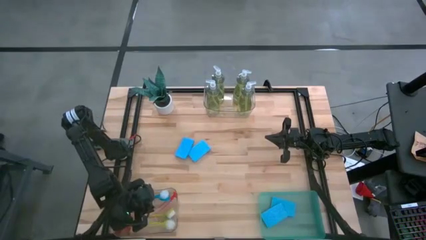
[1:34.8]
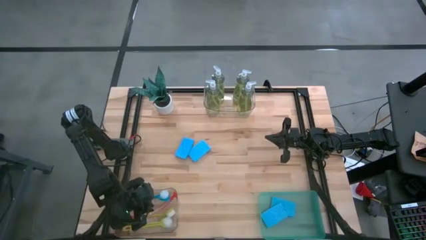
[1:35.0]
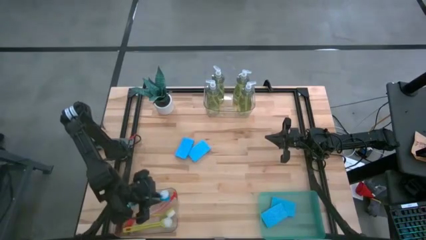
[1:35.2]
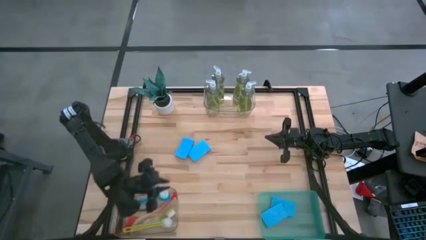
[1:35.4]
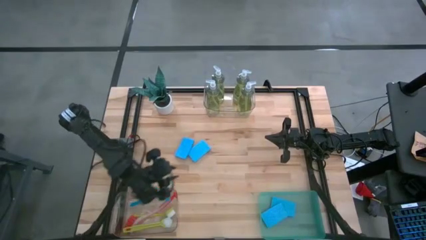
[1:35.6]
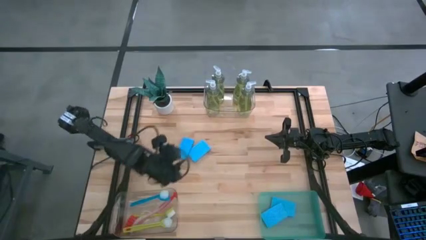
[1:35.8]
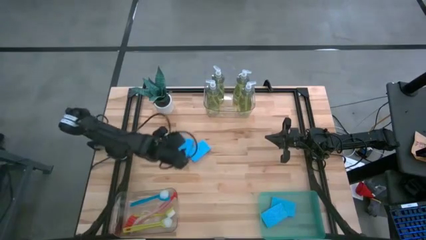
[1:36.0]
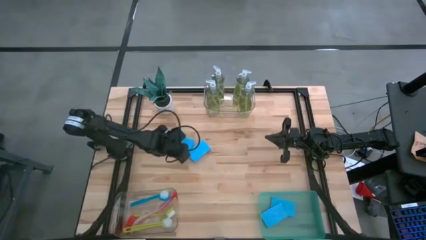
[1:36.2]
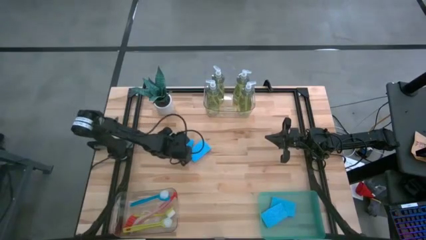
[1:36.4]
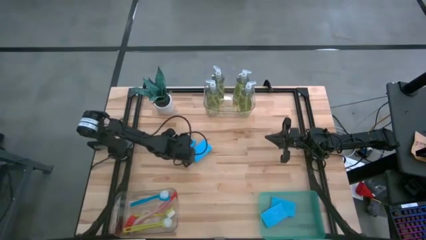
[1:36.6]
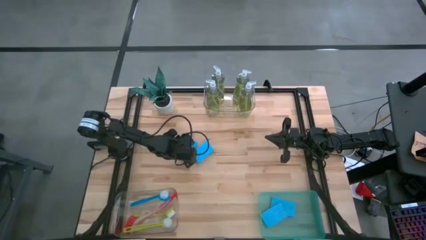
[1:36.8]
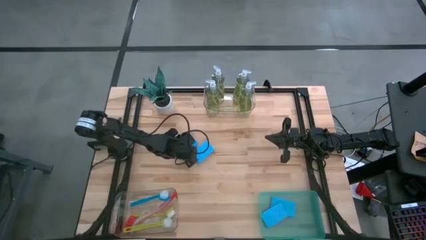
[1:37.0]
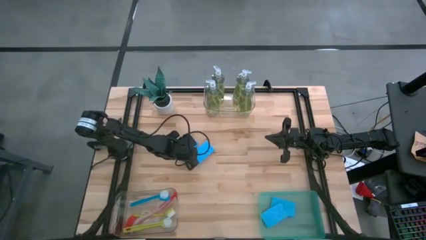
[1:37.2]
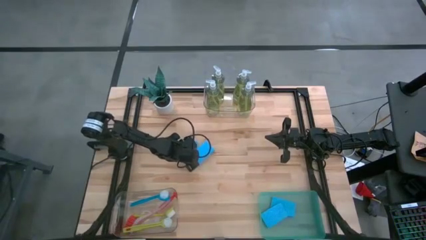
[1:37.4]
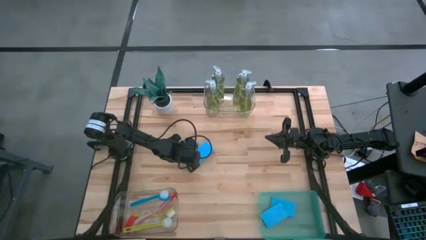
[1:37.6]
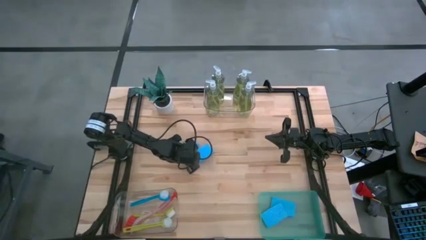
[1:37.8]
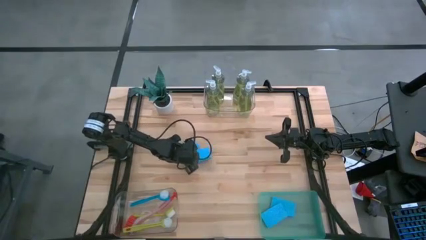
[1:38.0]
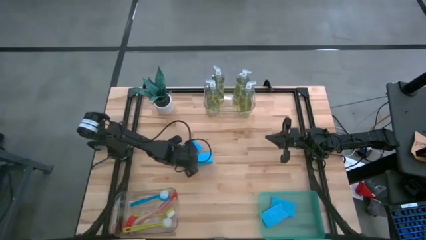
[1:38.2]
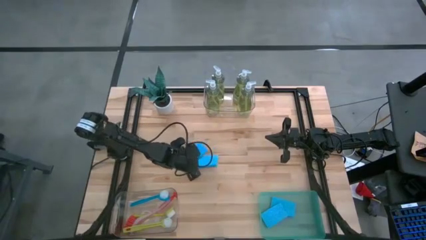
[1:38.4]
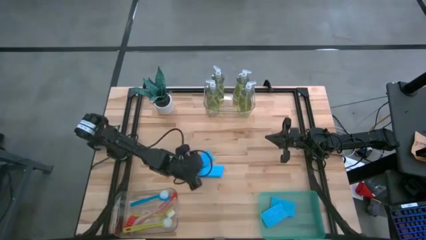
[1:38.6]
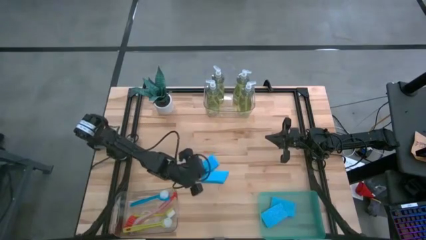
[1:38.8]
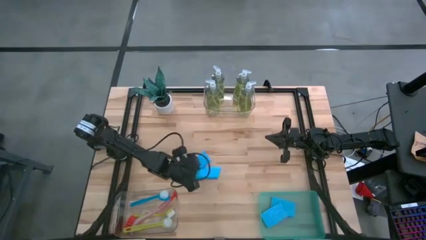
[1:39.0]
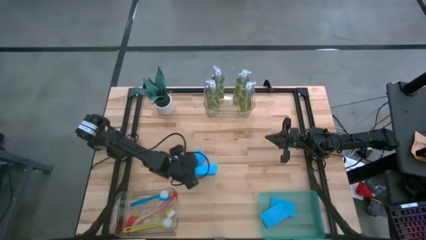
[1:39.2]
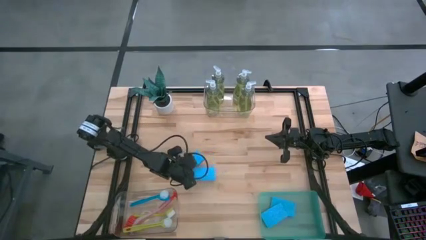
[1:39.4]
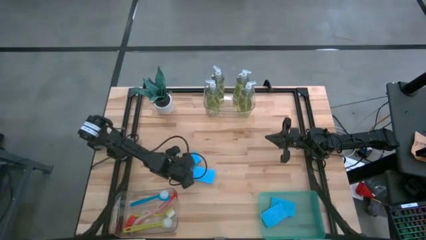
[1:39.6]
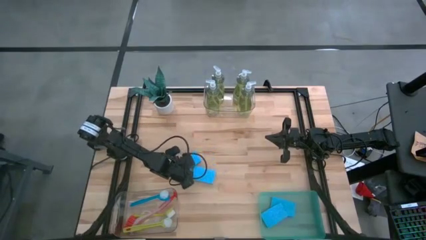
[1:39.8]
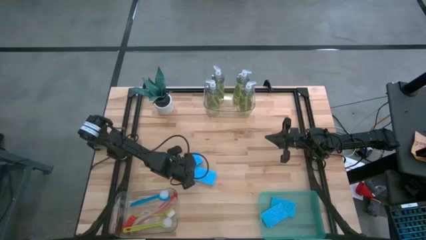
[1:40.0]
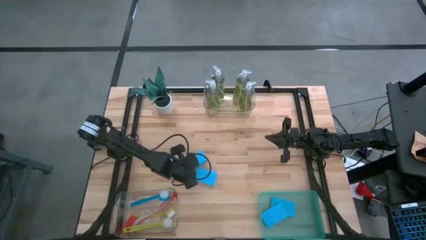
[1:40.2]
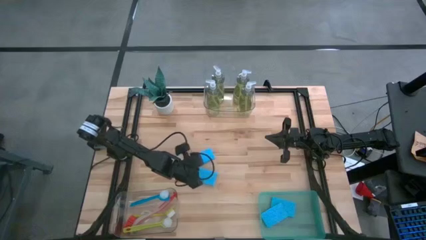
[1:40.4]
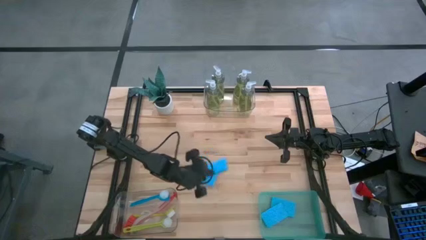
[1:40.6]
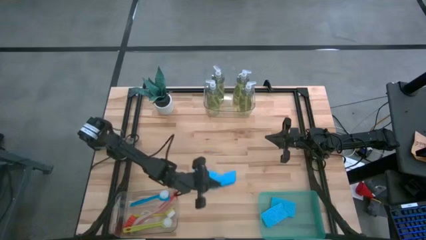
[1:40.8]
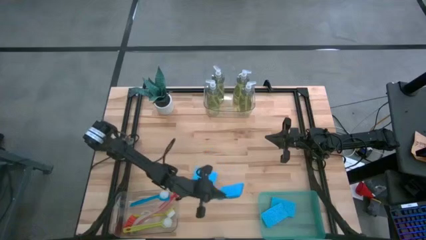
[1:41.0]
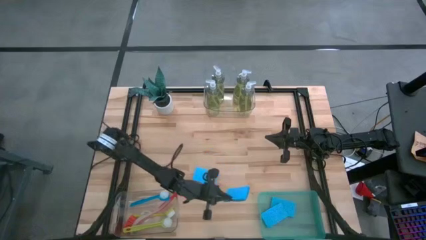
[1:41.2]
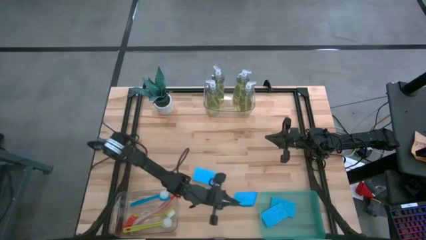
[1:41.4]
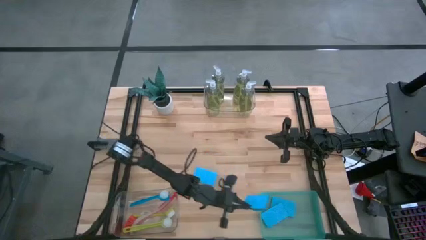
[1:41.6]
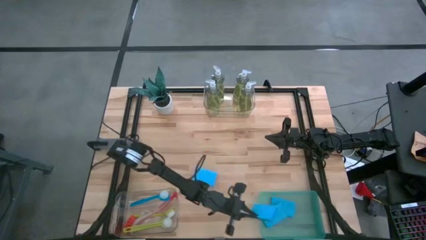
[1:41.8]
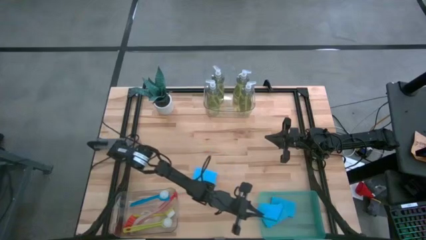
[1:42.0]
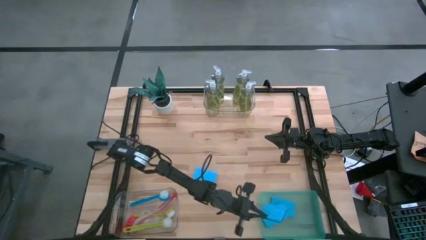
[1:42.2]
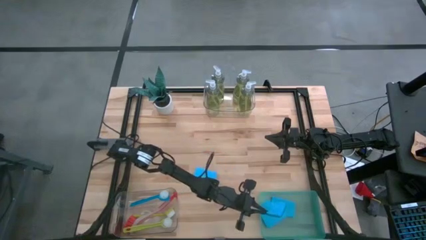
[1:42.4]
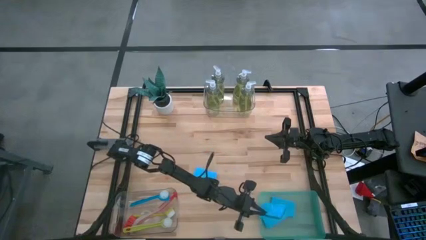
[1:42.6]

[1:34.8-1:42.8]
Task: Pick & Place Kitchen Sink Supplies
Put the blue sponge into the green bin

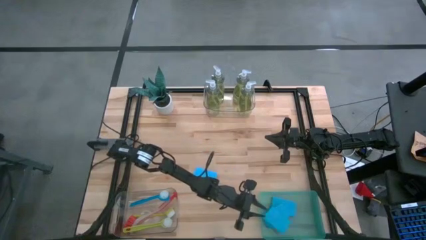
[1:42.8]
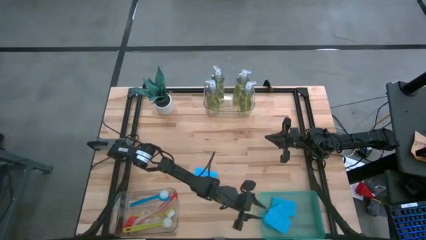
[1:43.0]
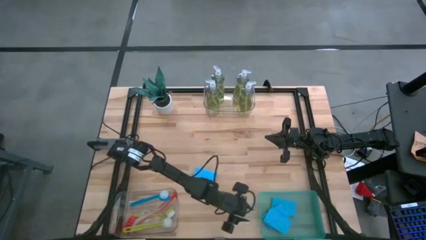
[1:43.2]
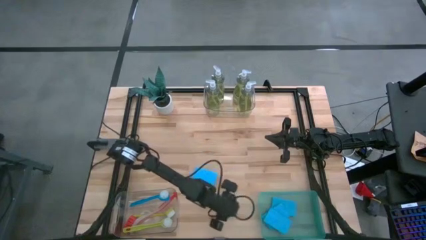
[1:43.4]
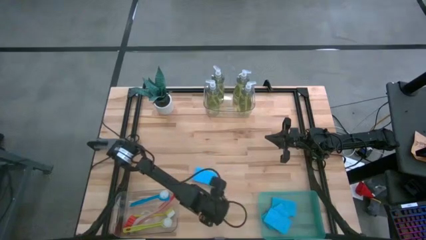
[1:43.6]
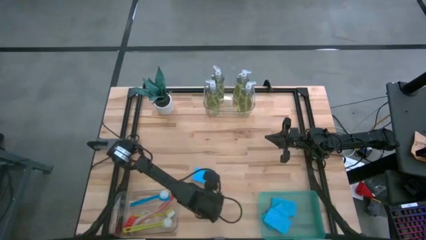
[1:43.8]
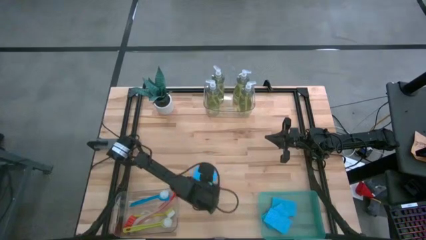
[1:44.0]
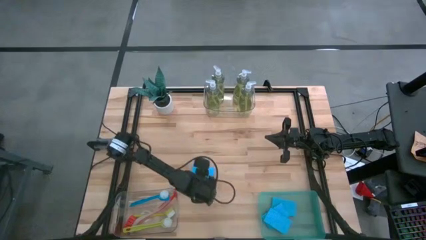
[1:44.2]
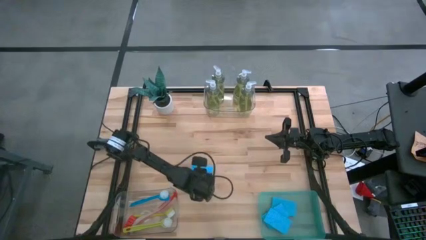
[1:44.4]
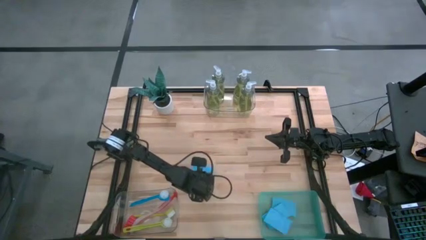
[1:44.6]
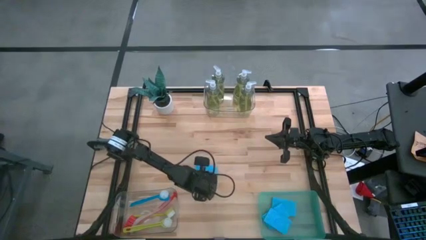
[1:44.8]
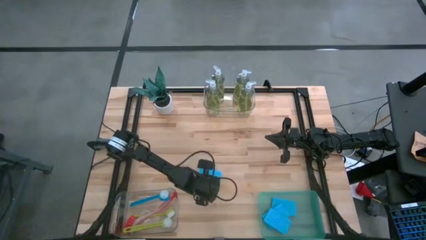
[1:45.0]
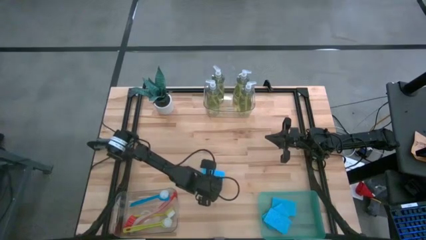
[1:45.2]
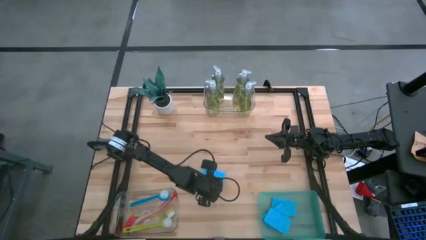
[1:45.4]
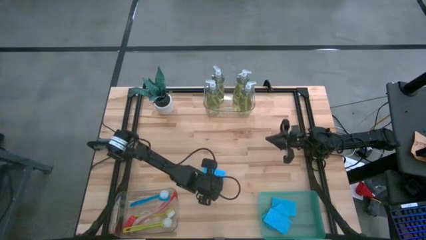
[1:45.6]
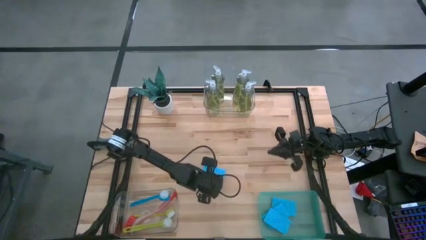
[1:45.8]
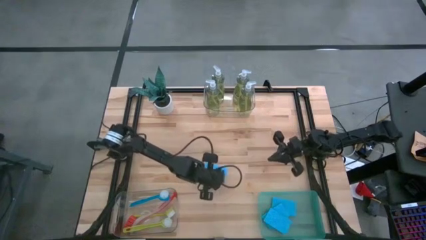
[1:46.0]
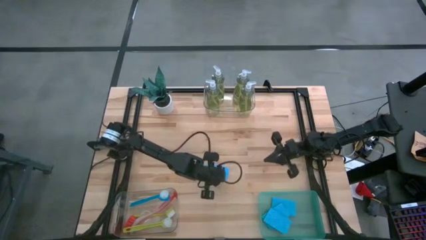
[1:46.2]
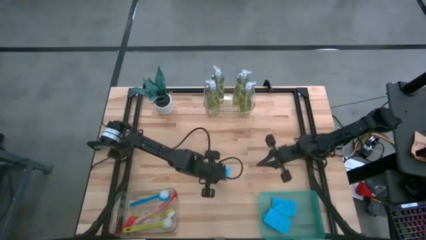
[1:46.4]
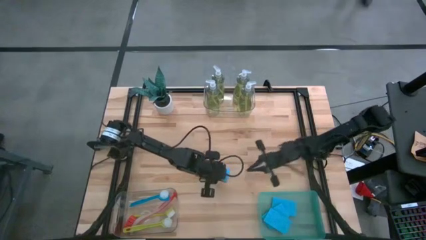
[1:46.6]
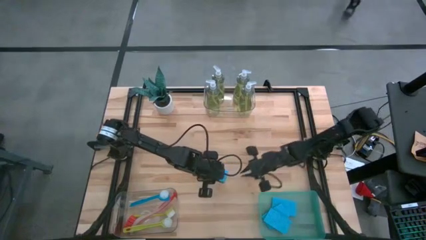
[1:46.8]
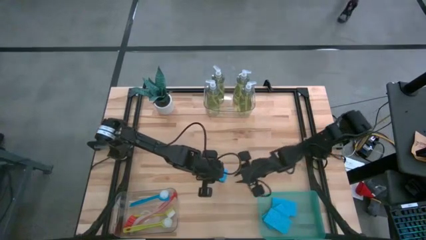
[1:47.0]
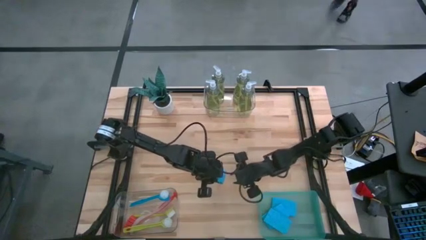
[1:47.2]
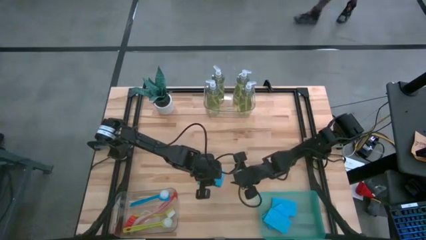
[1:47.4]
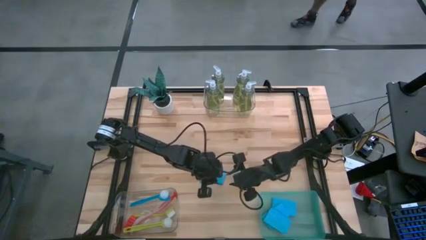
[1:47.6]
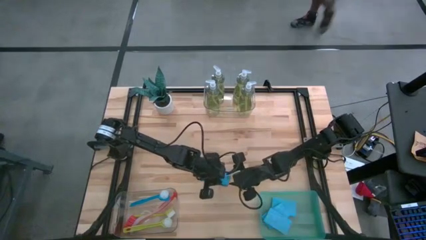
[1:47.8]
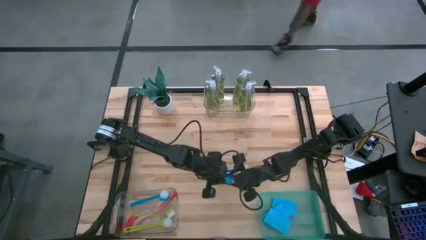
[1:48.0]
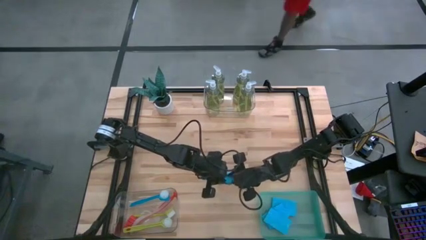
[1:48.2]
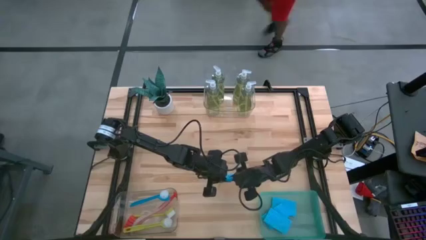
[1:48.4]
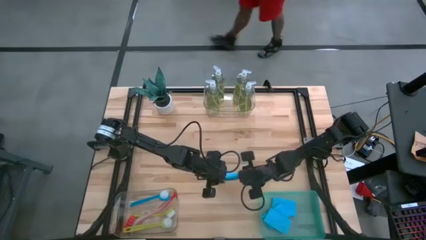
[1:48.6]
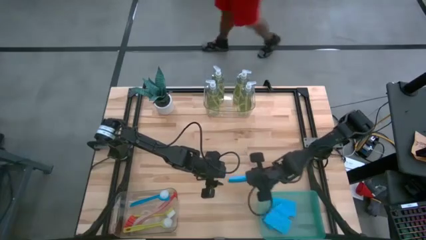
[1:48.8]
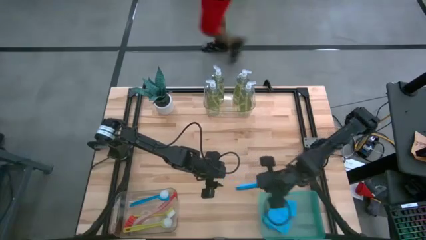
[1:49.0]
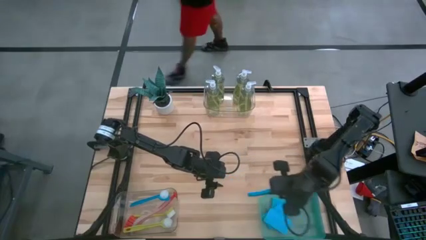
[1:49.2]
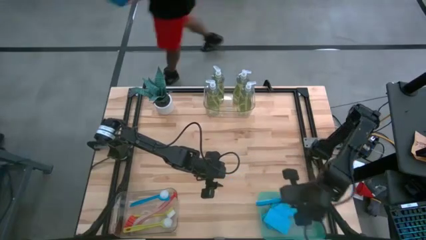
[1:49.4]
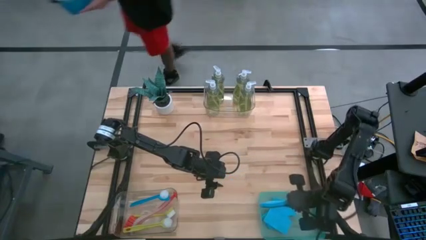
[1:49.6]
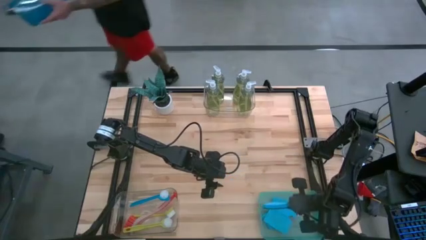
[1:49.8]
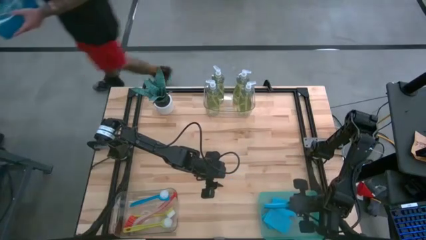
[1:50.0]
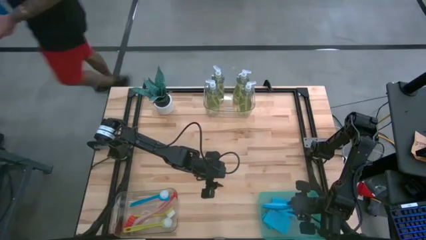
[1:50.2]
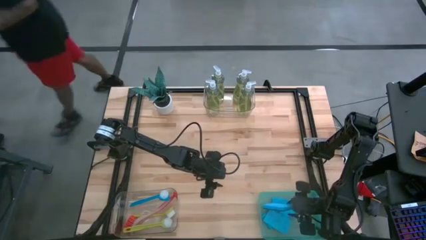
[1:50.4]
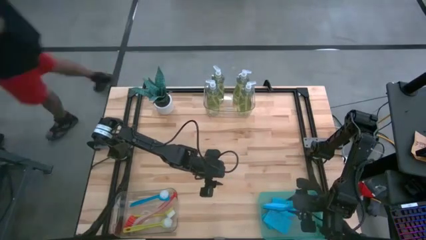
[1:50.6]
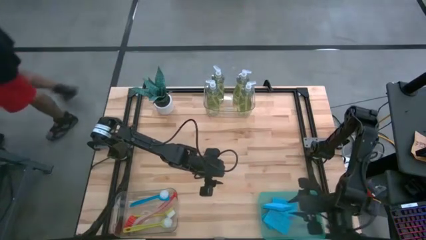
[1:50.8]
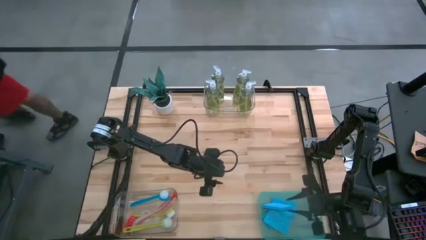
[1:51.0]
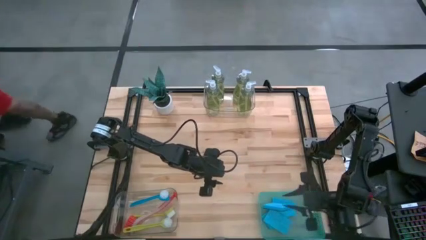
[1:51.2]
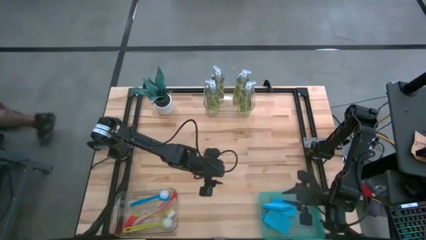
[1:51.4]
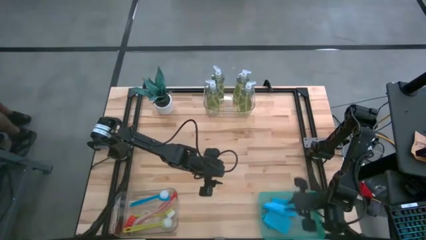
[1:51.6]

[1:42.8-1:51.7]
Put the blue sponge into the green bin
